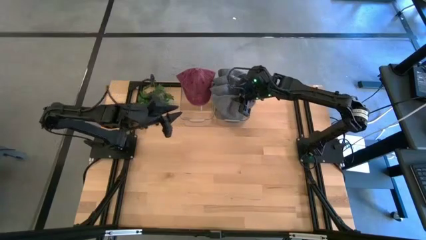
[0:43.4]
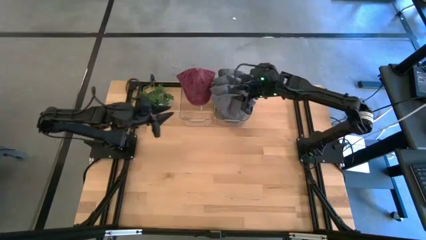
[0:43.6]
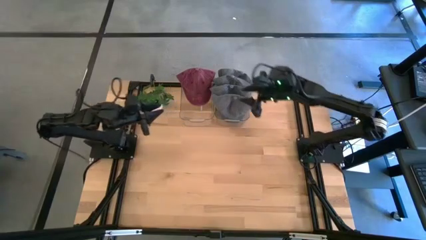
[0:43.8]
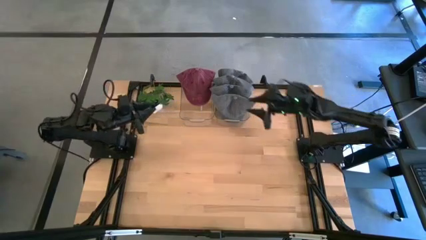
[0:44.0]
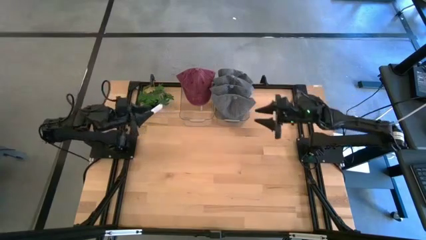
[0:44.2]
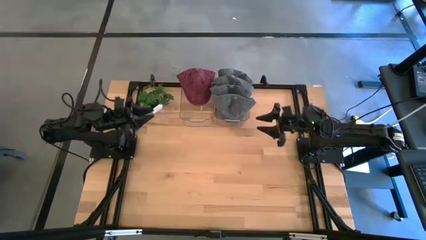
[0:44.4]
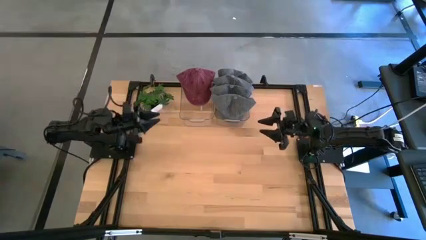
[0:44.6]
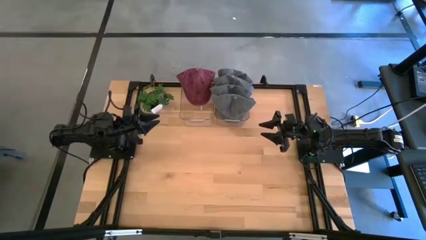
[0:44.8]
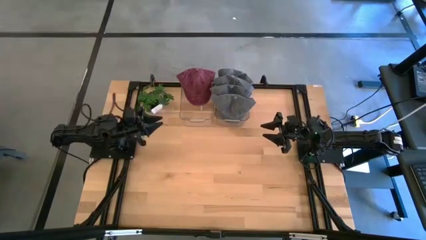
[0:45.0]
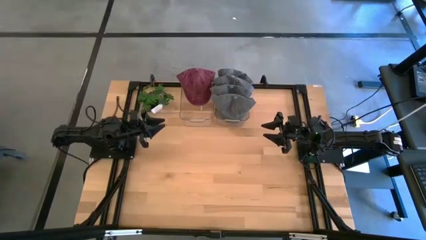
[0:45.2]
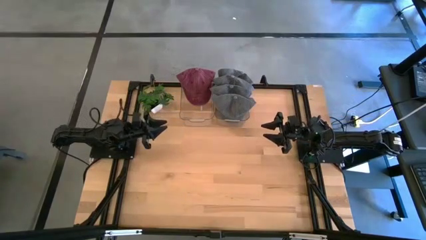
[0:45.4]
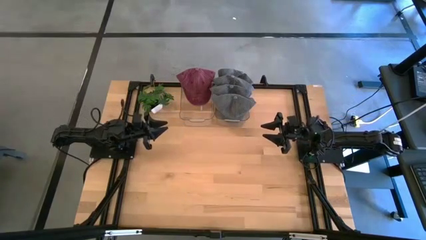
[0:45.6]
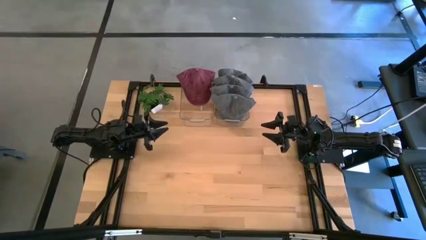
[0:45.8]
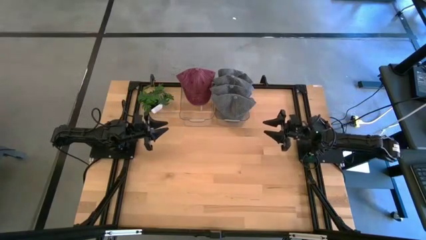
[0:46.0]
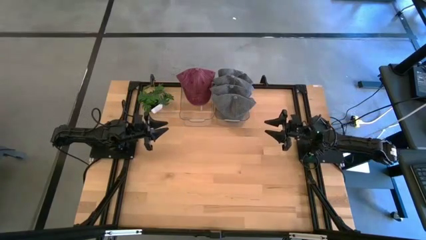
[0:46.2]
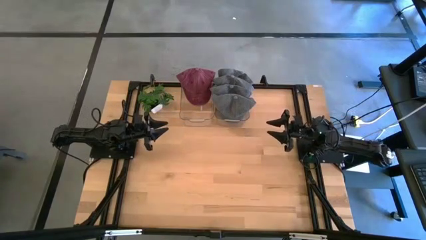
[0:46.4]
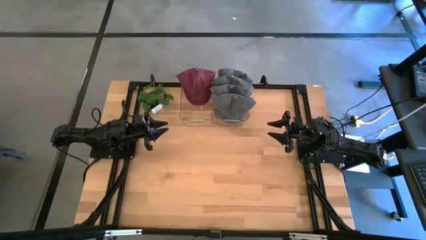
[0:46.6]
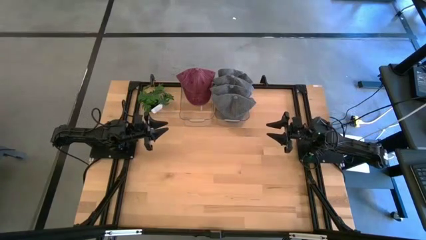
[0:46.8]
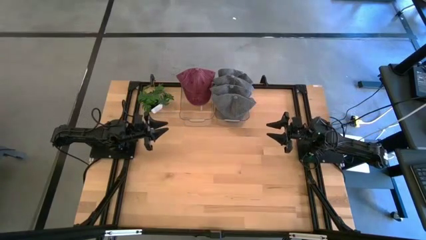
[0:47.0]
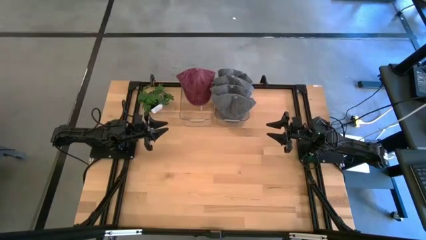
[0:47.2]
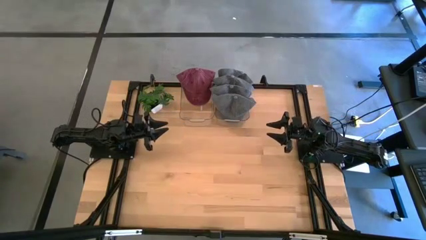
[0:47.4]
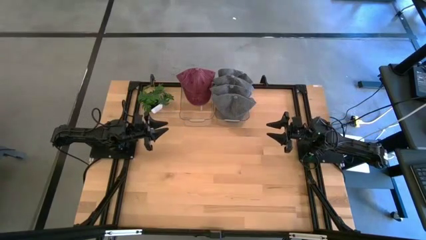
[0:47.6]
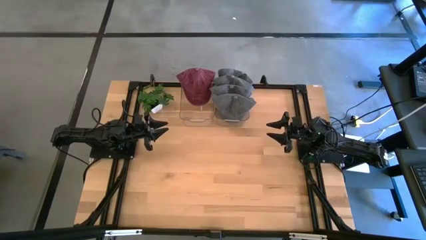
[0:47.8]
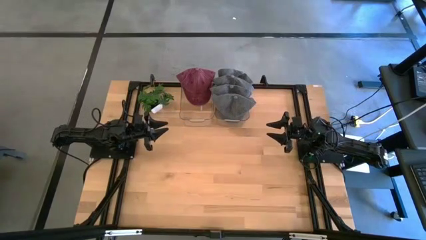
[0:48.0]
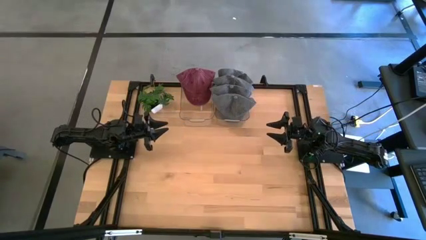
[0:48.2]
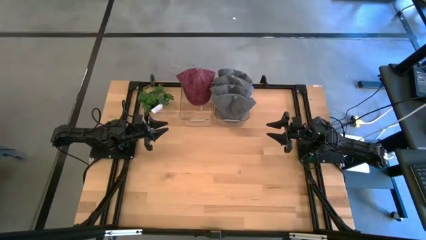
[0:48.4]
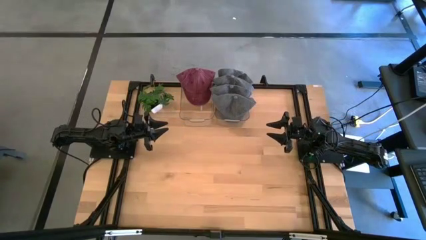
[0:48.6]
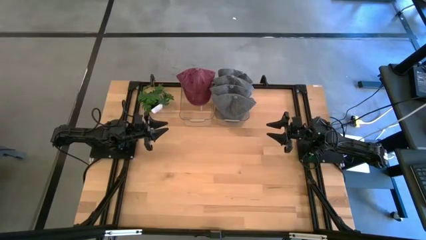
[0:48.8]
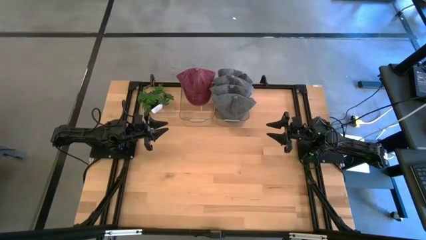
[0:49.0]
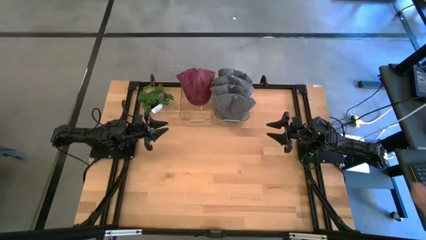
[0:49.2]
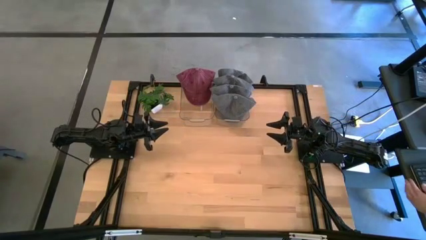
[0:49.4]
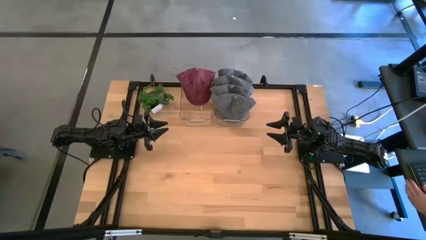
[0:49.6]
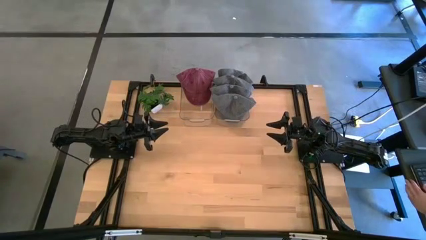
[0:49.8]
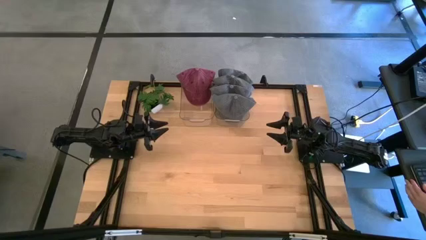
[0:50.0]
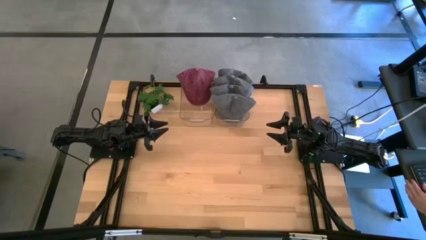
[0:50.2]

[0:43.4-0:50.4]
Task: Pick & Place hat
Return to Home Position

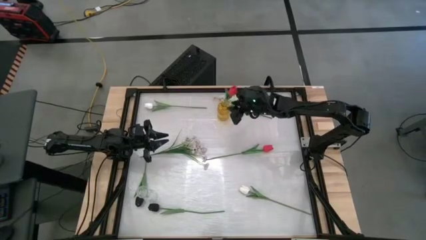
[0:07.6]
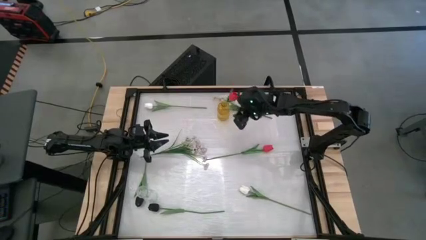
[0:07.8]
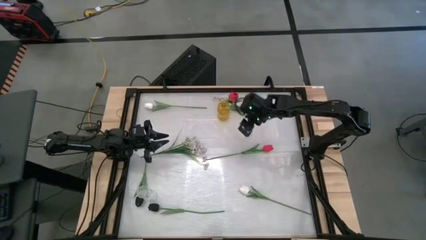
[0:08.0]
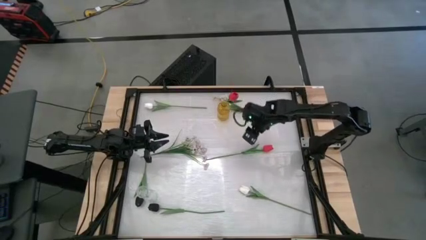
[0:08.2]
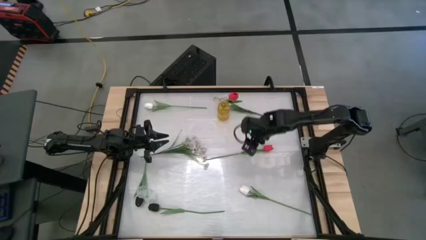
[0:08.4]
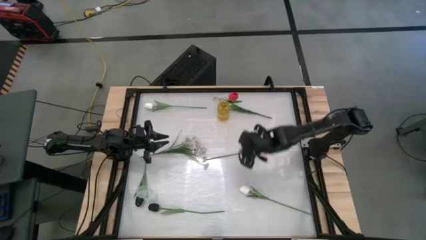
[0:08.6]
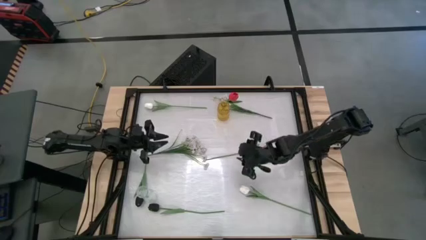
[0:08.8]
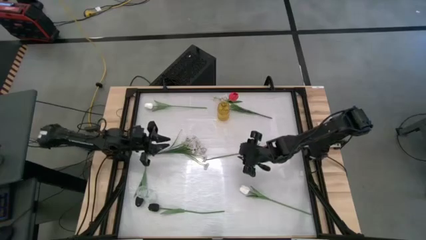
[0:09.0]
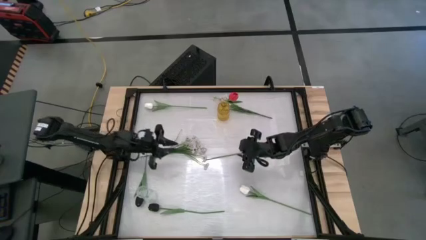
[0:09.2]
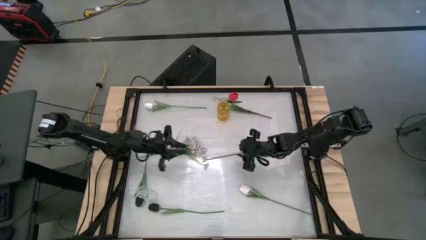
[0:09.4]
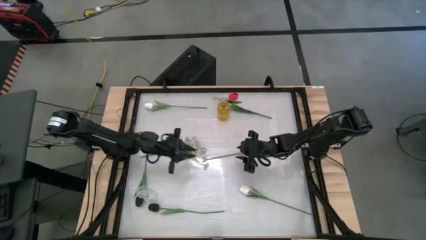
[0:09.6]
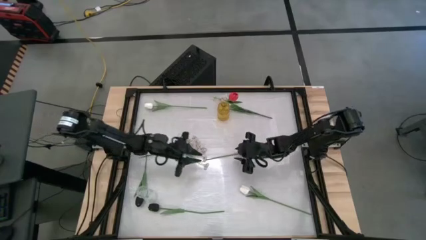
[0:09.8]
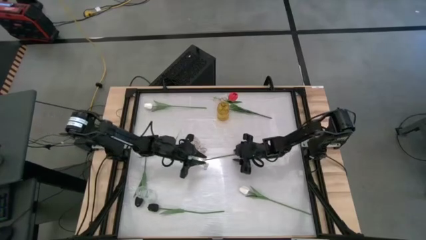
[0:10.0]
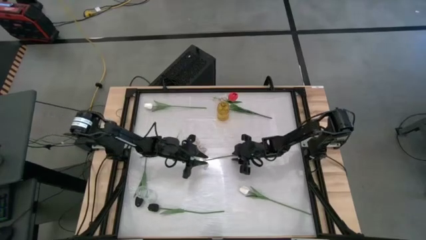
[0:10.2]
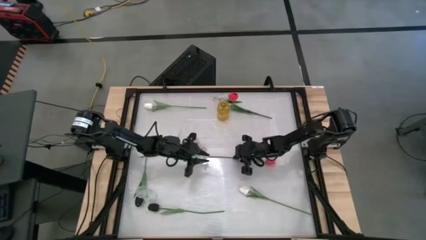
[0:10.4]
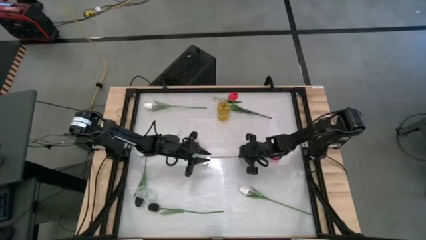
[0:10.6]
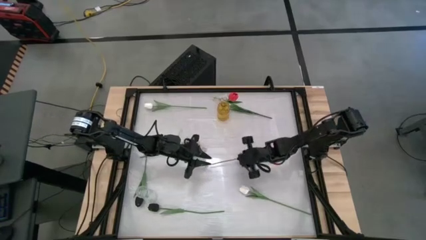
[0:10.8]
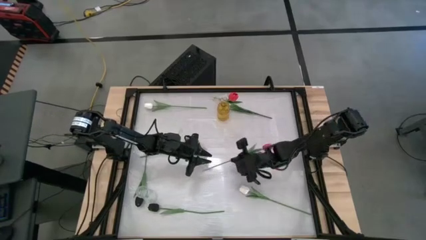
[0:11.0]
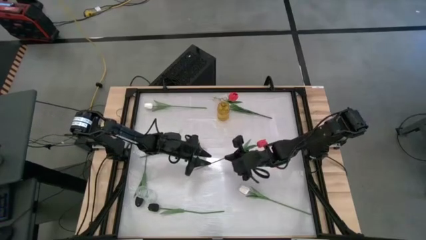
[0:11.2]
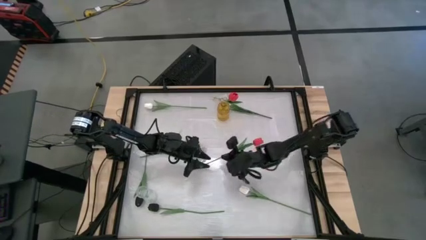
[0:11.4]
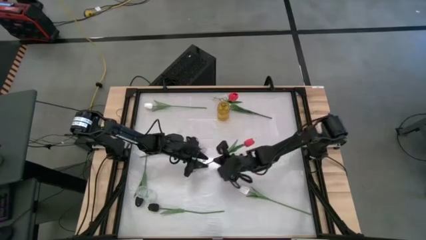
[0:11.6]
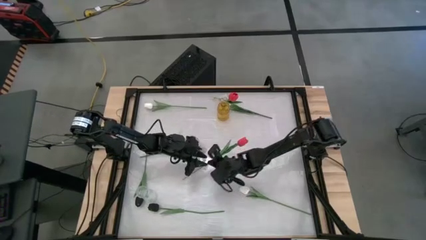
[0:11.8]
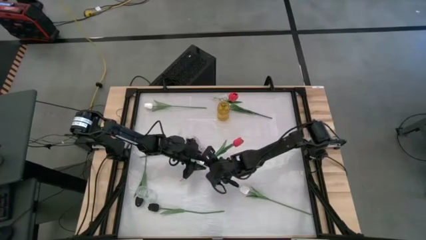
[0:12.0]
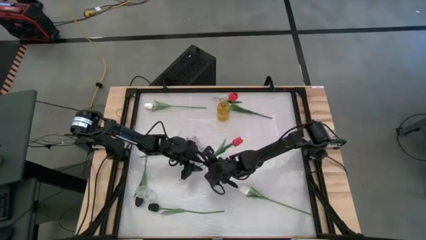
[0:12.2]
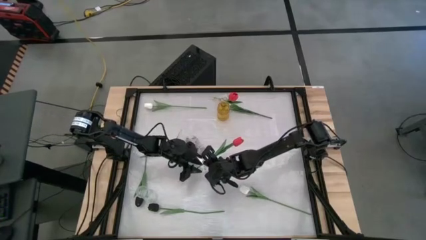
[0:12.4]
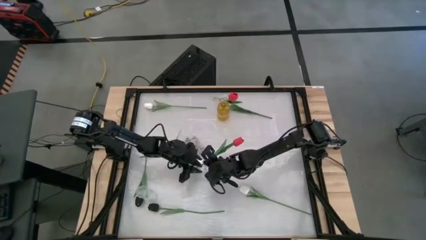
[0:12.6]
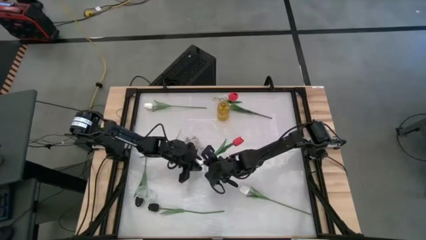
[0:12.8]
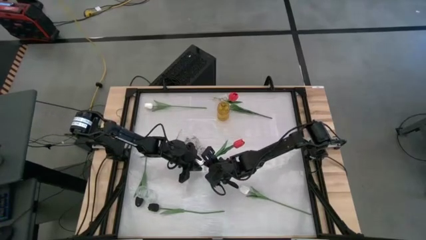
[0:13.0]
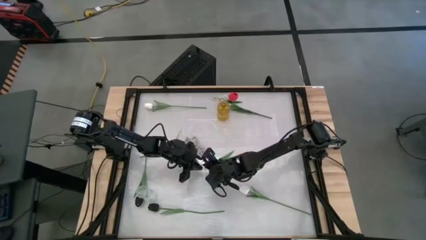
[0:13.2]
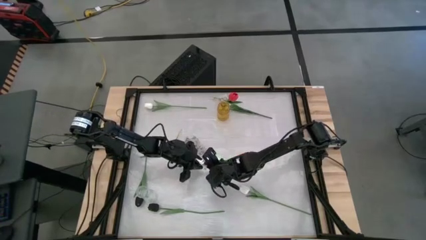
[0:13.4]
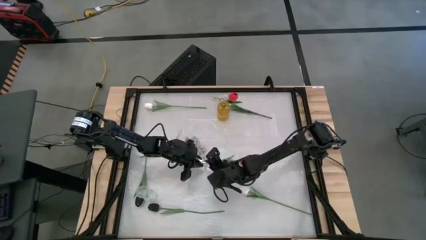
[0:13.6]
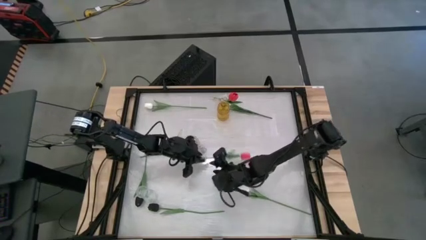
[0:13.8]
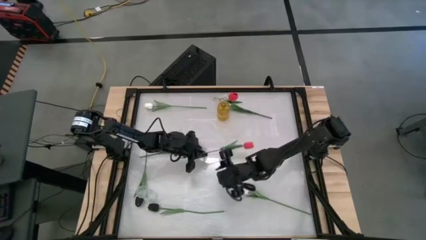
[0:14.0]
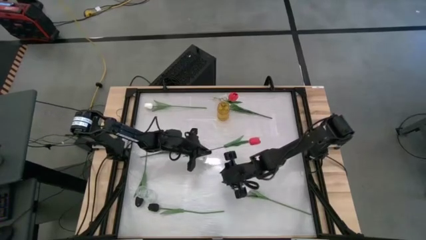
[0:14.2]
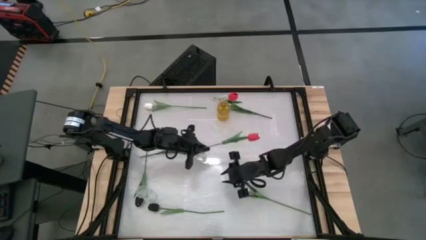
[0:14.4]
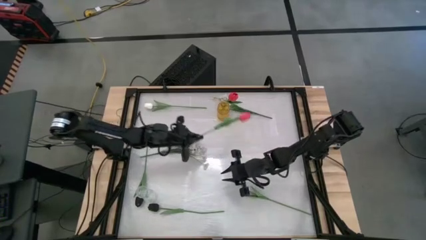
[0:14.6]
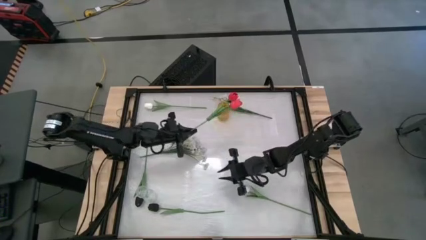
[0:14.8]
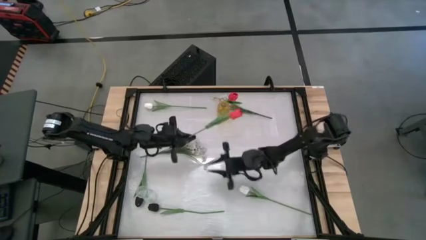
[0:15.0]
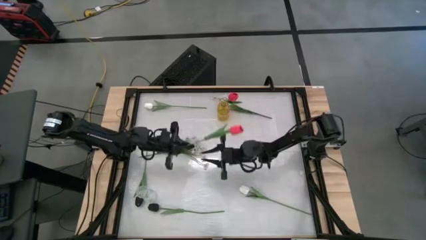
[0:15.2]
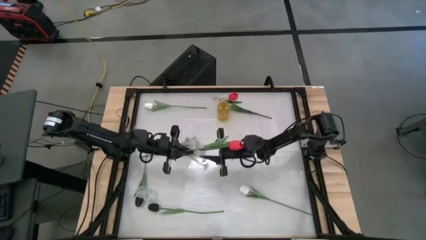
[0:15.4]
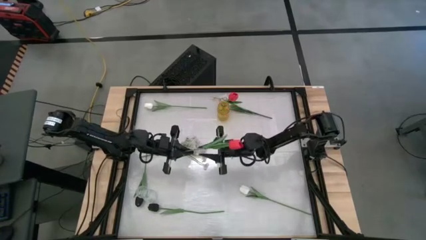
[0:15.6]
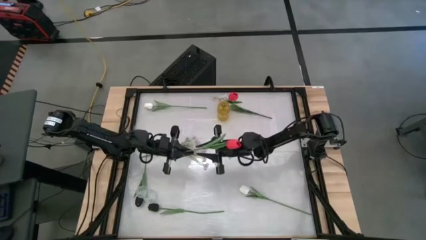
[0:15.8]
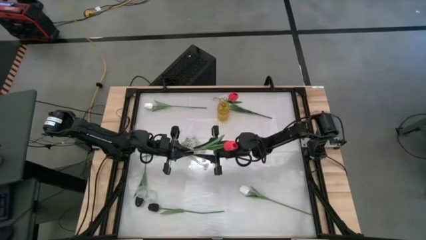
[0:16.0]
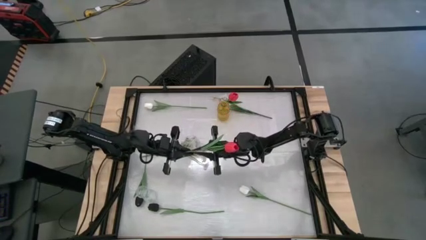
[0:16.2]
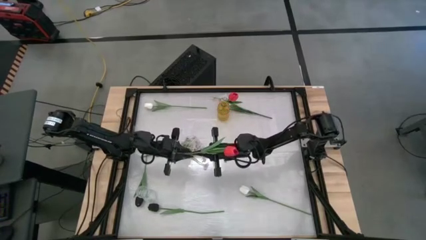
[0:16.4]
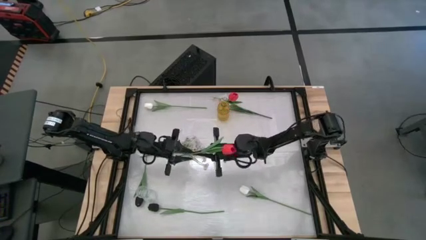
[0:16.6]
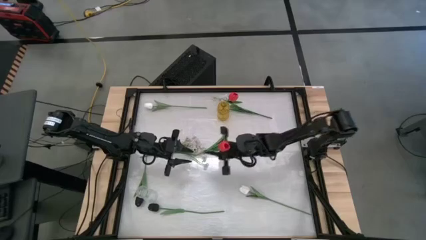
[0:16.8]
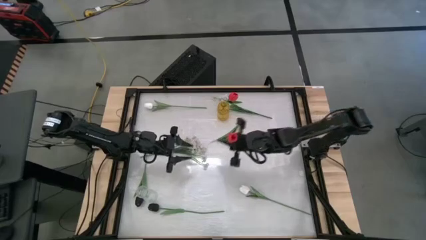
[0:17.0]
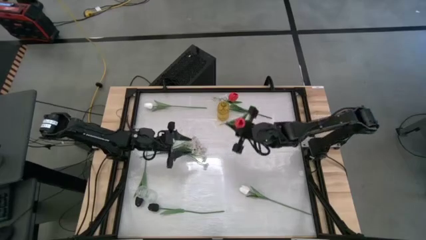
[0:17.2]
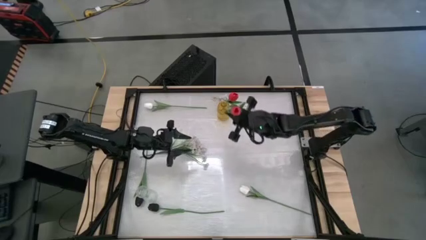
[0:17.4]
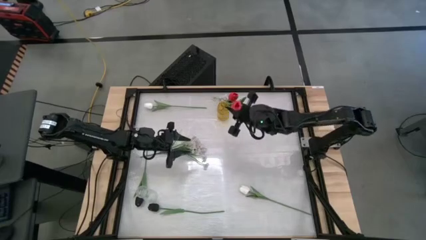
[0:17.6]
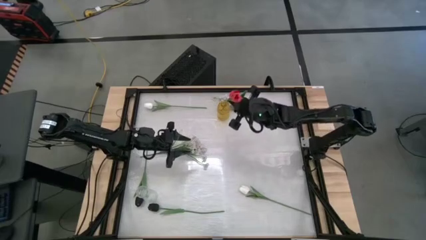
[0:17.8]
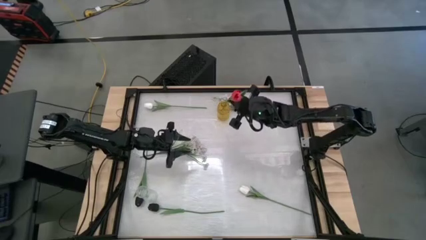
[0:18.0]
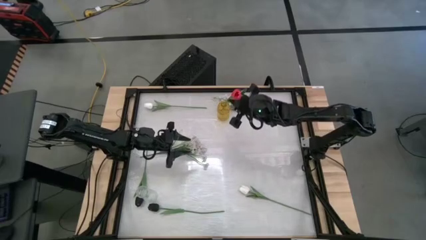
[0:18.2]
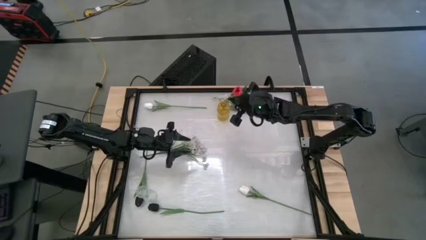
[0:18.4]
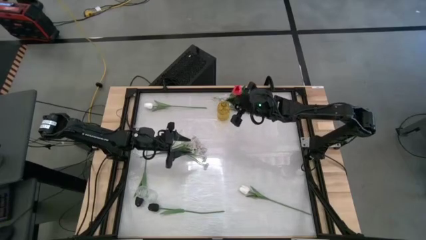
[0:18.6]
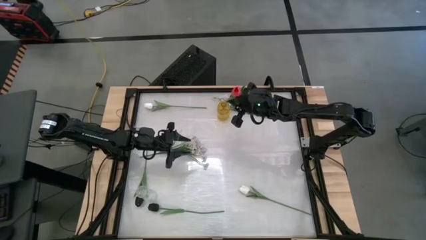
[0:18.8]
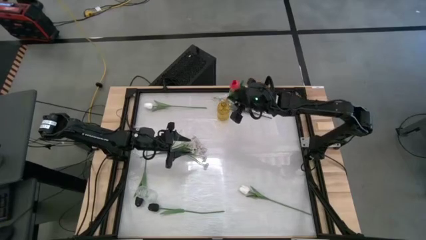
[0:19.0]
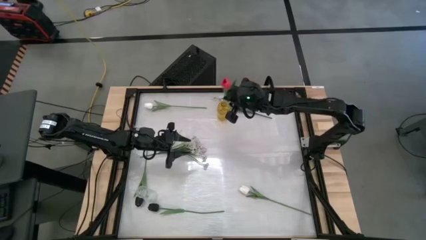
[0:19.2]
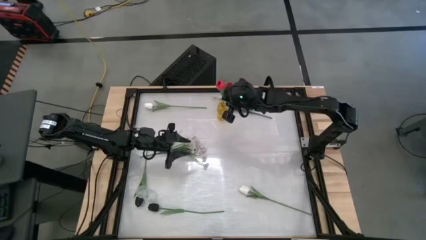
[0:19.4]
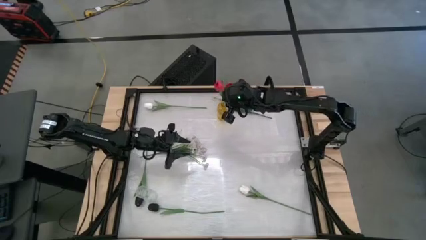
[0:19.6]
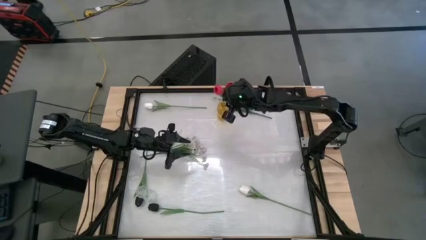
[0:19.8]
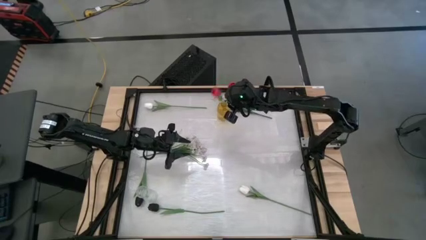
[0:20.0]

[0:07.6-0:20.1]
Task: Sort flowers into vase by color
Put the red tulip into the yellow vase
